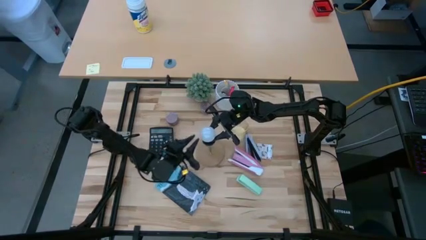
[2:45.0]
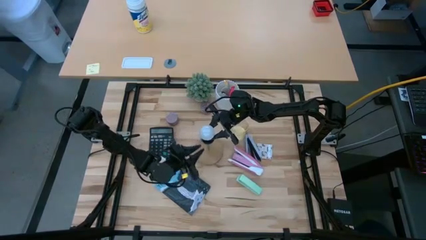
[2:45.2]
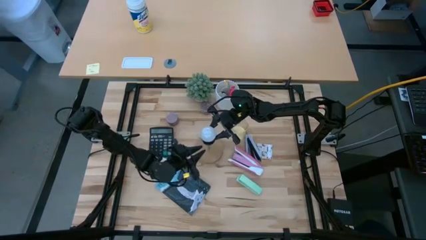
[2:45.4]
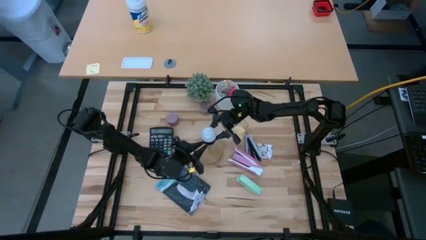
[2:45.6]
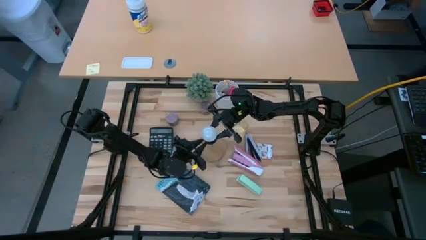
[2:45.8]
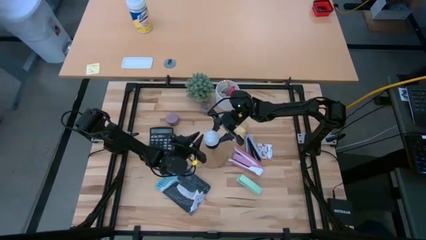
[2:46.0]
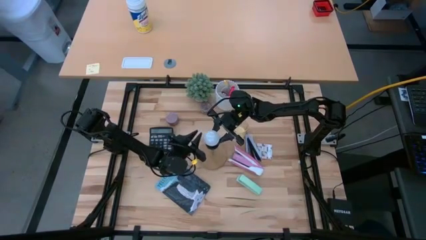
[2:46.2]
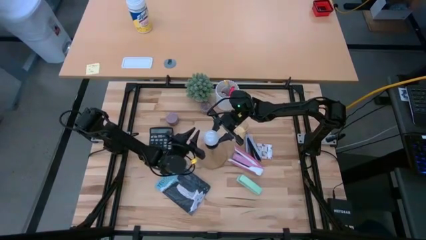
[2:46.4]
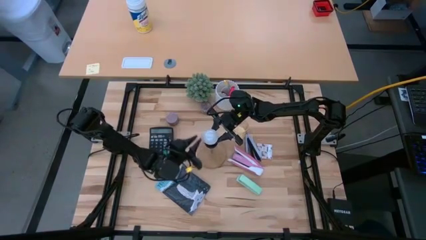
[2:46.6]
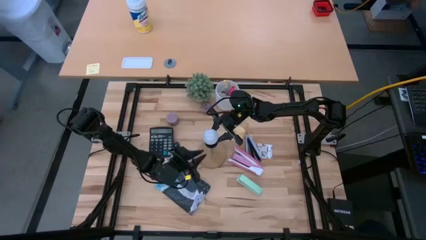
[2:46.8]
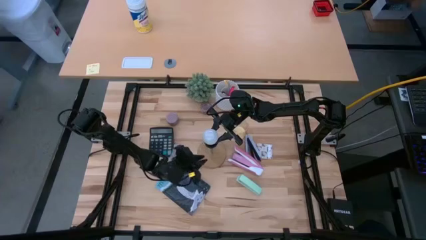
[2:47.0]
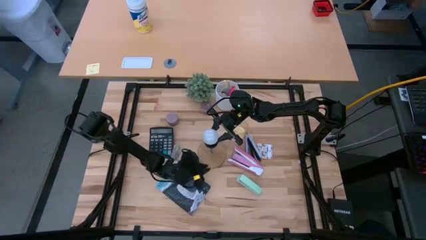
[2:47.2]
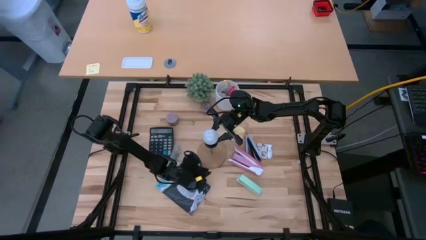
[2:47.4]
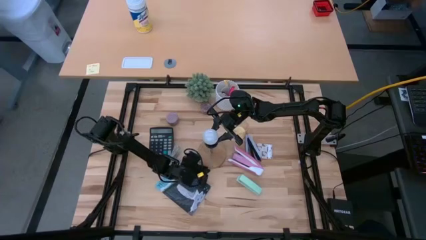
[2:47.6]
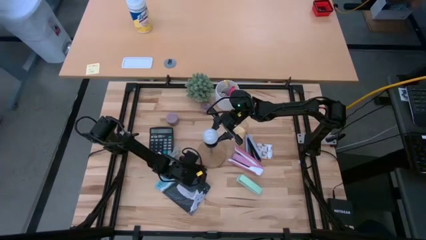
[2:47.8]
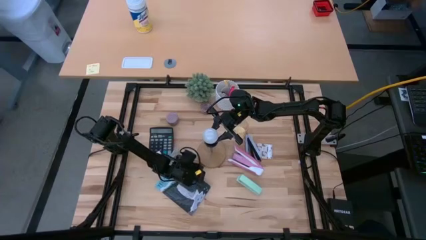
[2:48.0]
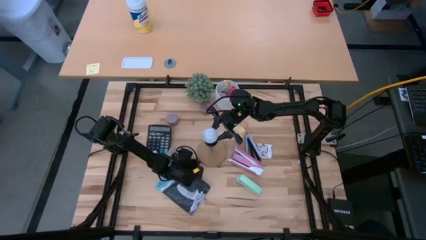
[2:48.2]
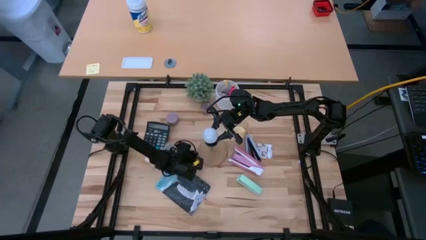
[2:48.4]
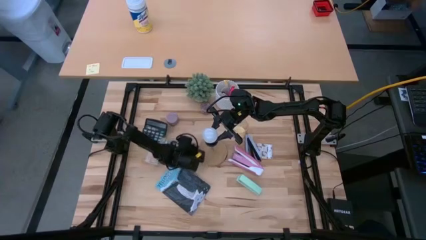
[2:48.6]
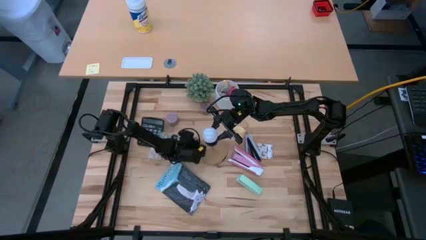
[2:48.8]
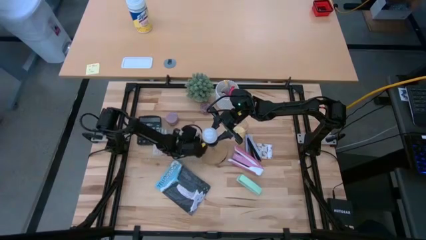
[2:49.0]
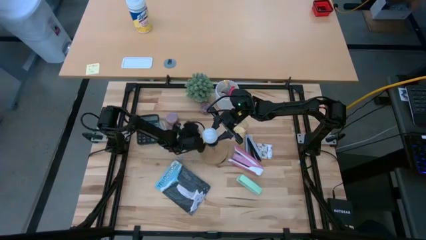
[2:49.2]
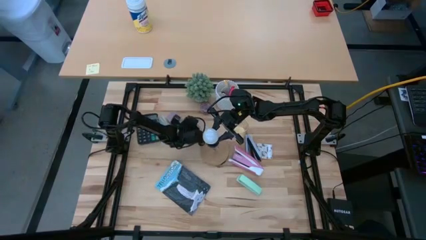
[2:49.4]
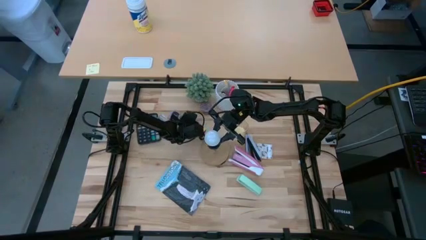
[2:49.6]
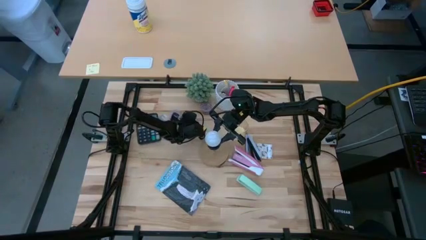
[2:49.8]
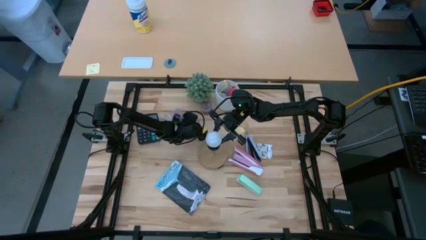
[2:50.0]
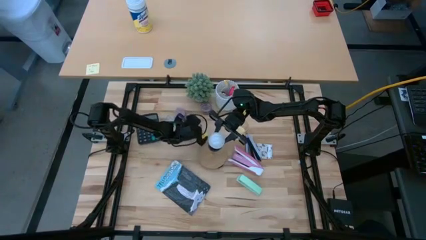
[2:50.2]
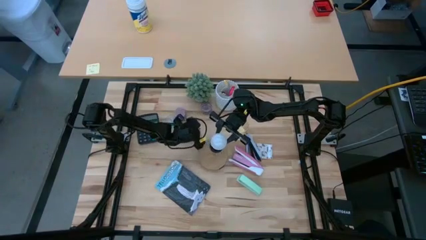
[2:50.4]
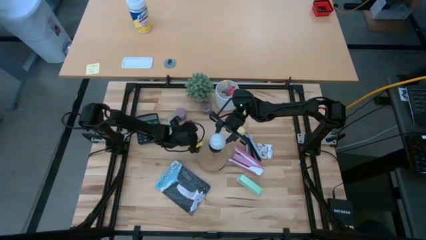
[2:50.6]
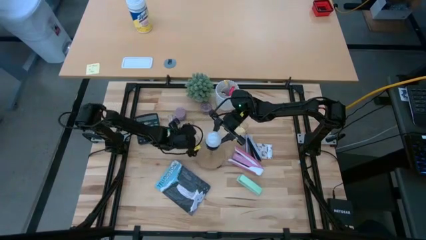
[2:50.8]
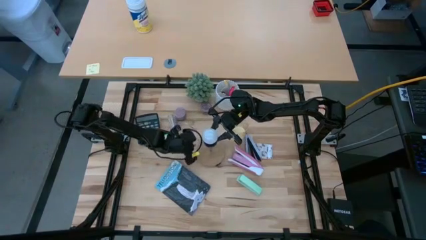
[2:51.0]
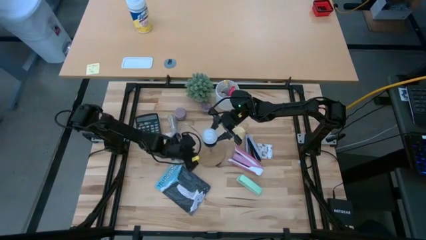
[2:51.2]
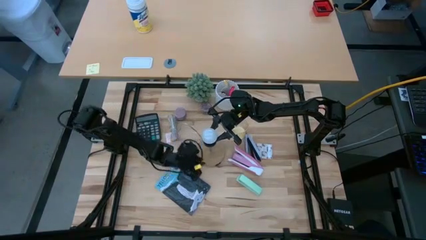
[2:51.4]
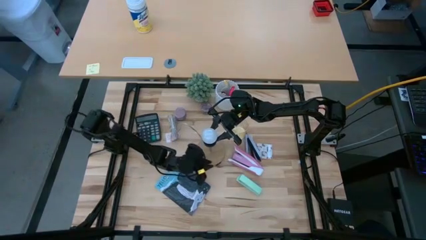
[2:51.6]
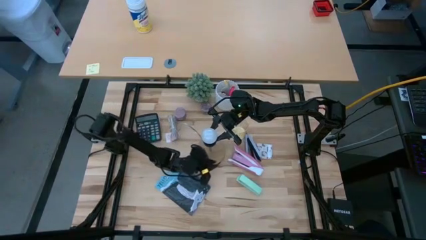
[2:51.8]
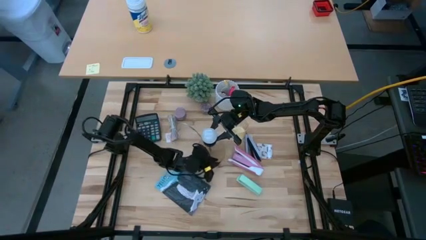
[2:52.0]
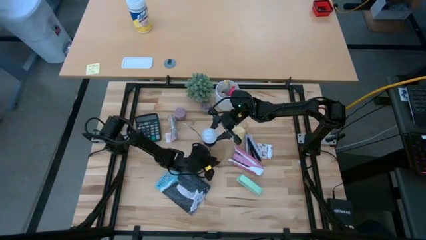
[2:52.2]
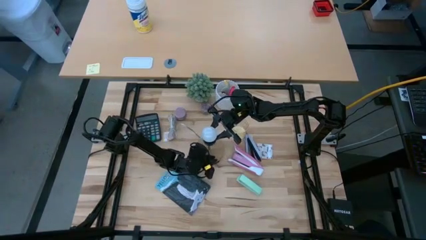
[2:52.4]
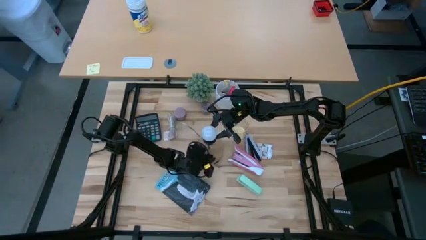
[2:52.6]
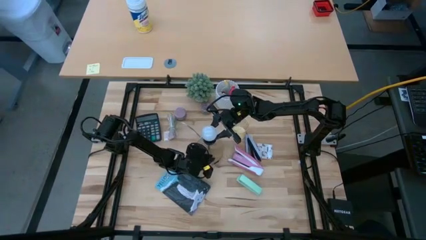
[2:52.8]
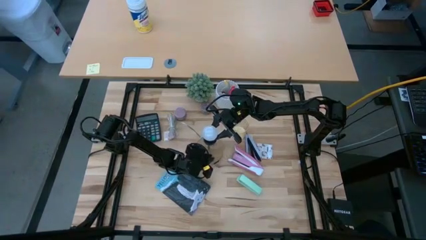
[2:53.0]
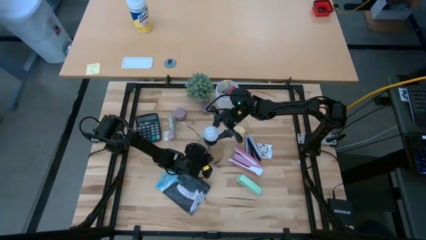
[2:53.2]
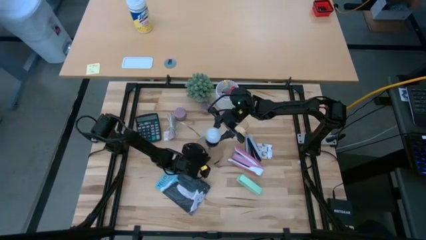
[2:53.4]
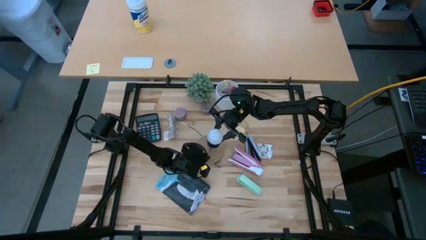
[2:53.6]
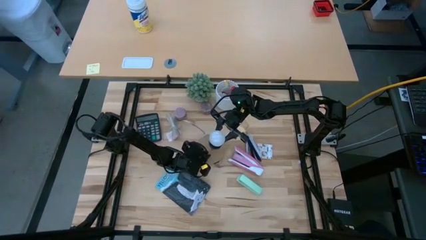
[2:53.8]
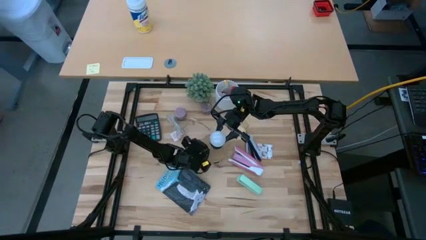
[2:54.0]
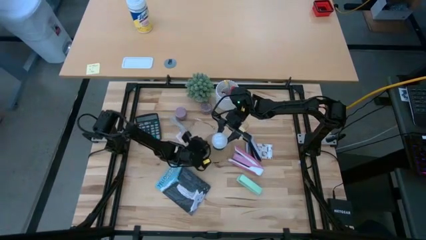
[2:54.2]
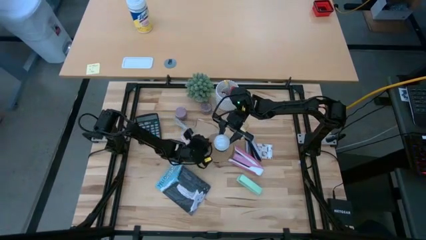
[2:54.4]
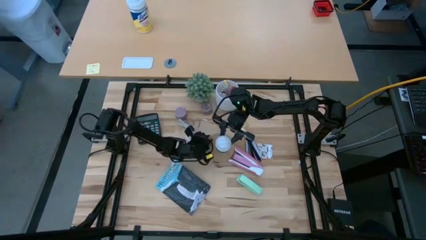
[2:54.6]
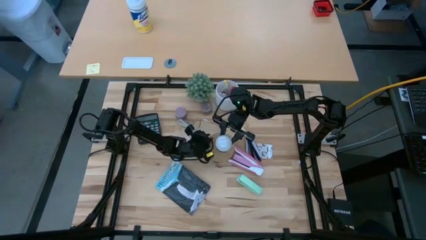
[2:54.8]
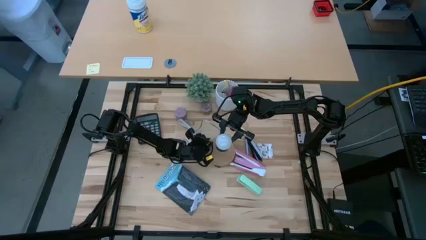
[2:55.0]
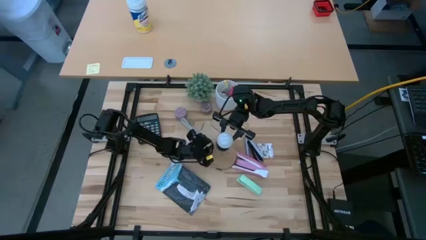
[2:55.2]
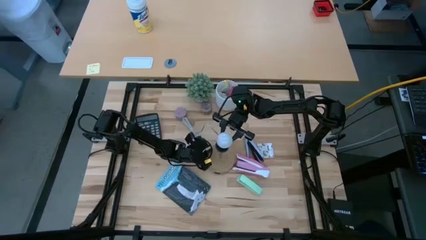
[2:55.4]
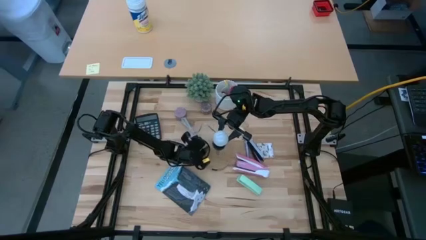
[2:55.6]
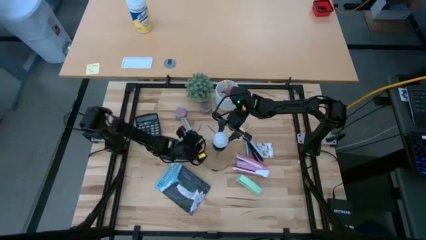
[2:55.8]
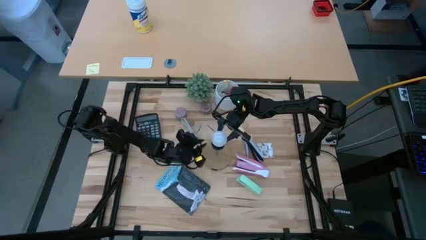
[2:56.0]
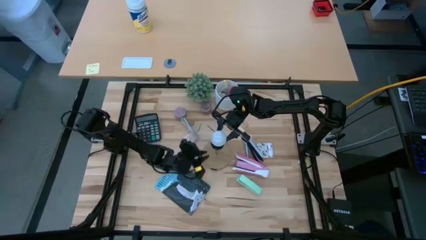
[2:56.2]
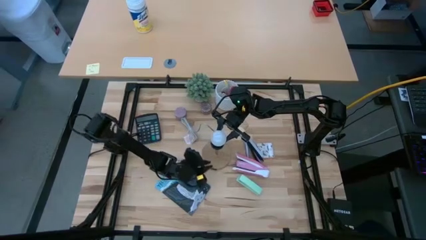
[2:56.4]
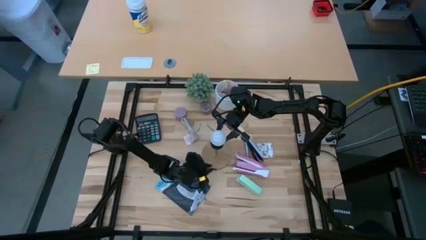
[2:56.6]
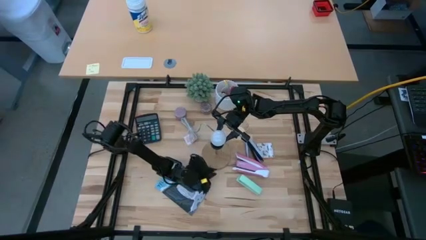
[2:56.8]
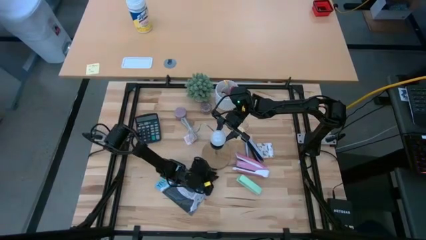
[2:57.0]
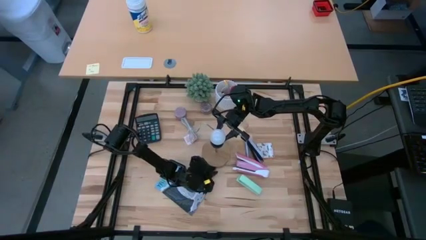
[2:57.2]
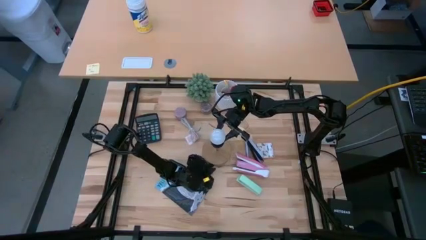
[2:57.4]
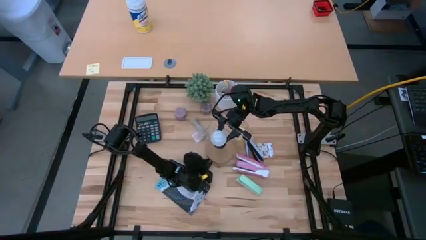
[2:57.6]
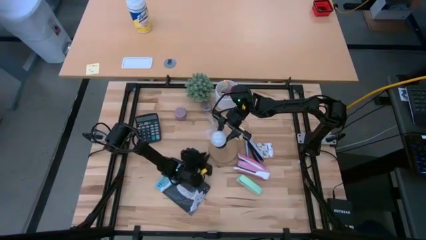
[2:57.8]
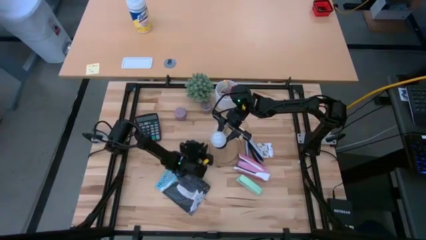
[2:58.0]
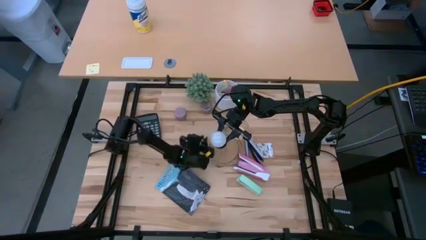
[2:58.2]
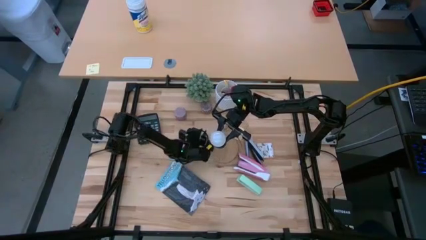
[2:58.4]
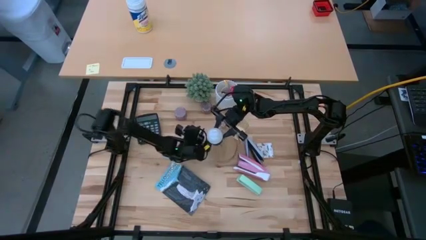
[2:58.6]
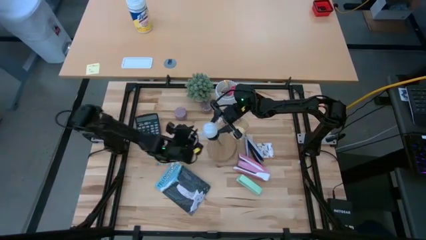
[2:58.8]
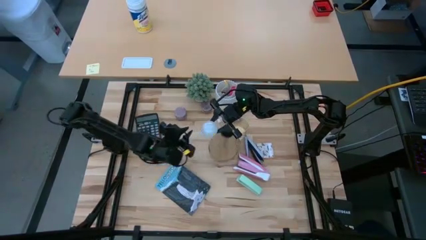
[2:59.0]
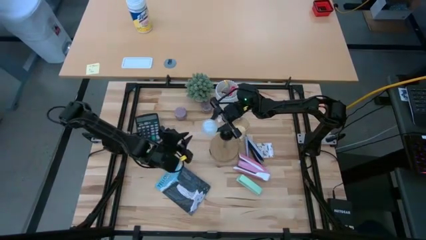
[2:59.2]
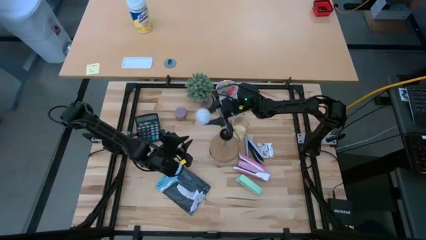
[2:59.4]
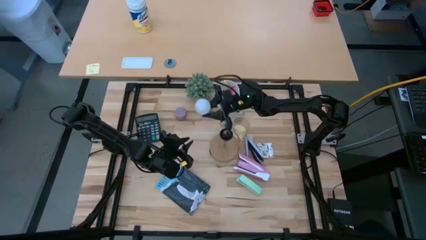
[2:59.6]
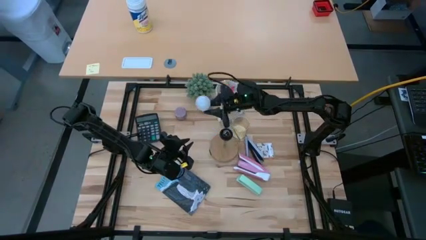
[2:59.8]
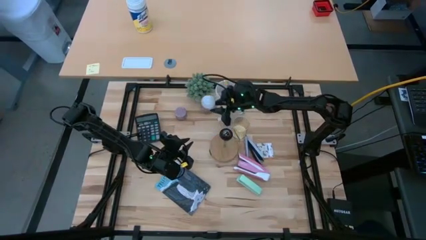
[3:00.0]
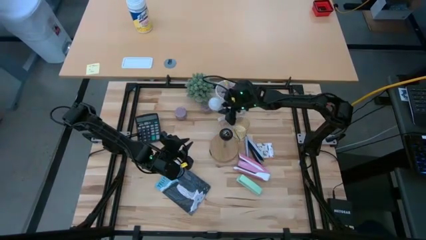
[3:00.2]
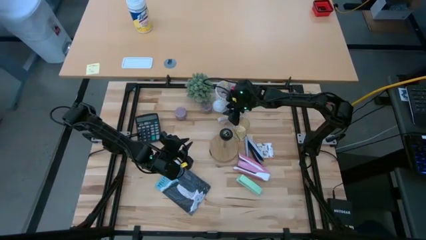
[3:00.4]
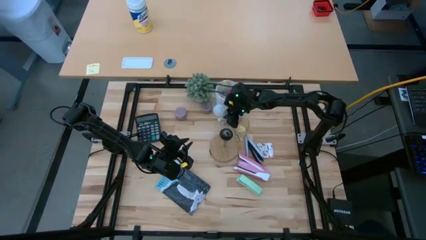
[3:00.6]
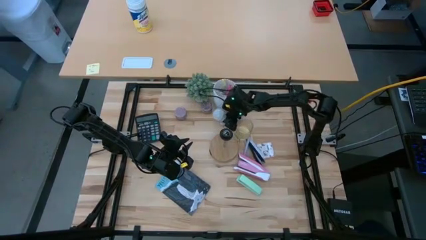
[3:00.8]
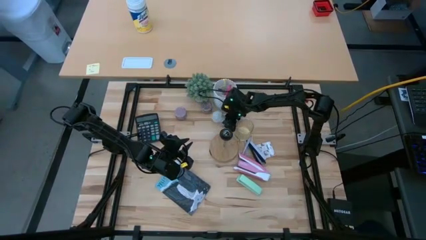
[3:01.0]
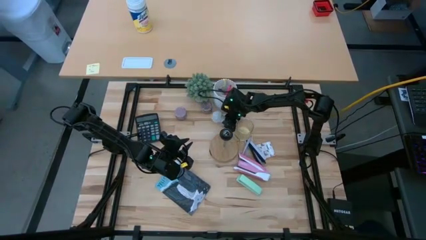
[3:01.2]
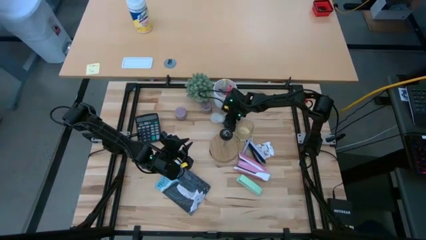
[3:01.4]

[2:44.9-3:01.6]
Task: Screw lightbulb
Remove the lightbulb from the lamp
